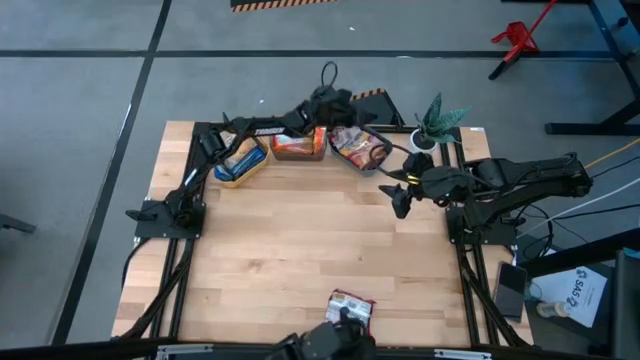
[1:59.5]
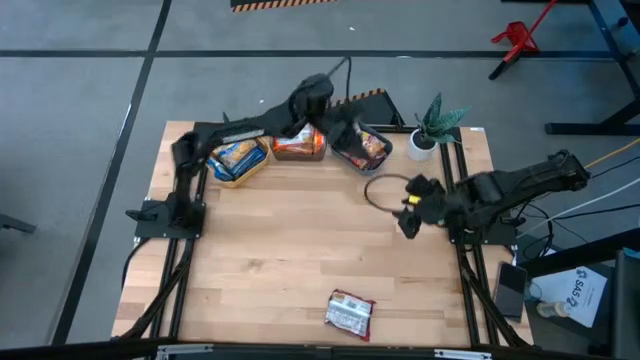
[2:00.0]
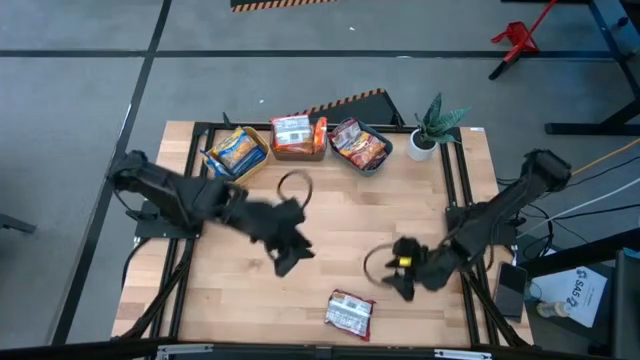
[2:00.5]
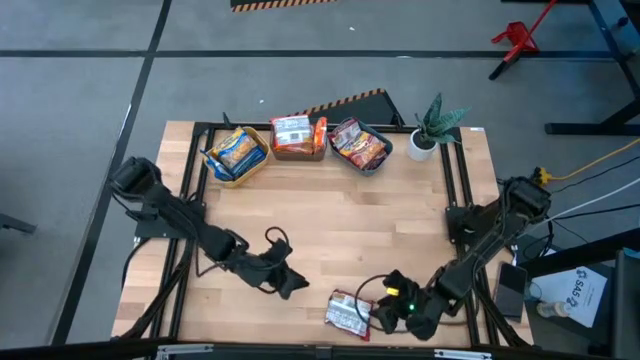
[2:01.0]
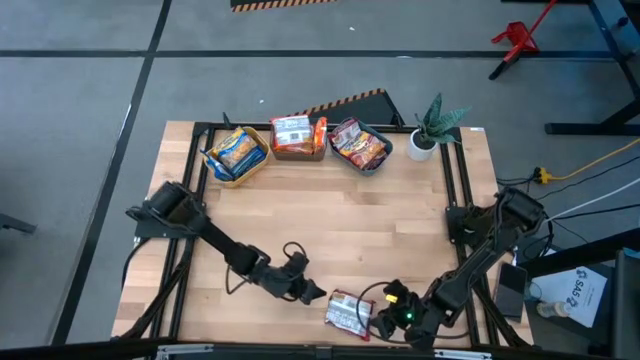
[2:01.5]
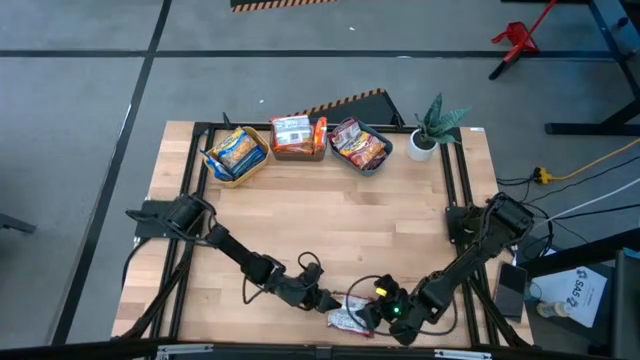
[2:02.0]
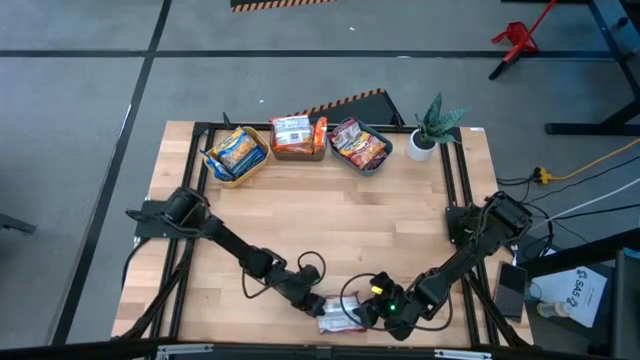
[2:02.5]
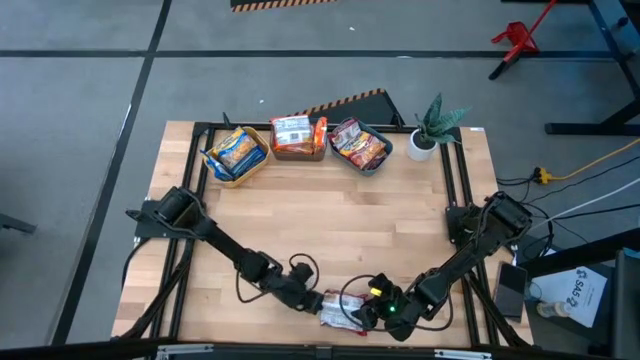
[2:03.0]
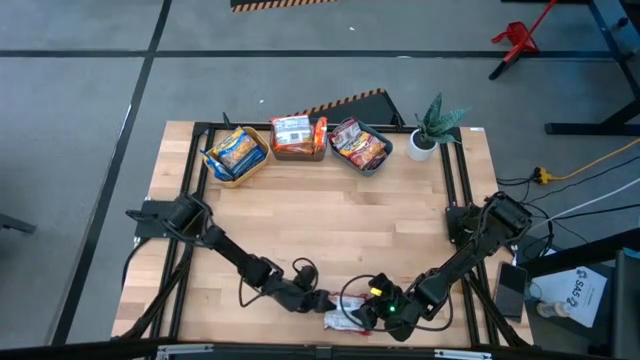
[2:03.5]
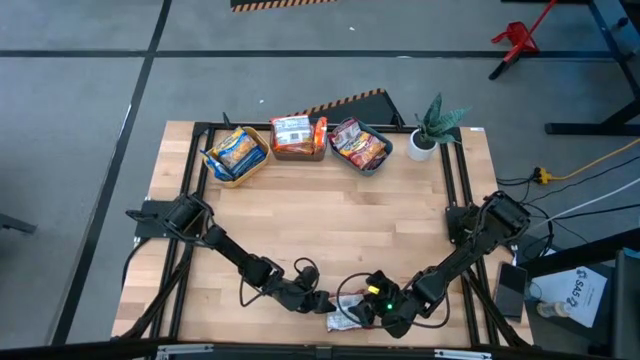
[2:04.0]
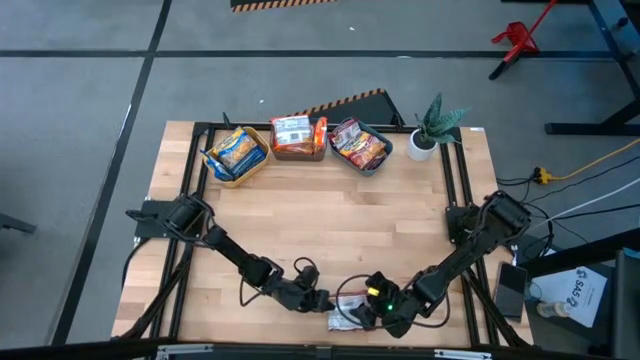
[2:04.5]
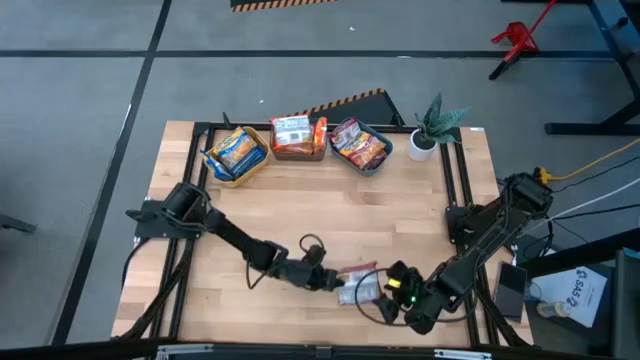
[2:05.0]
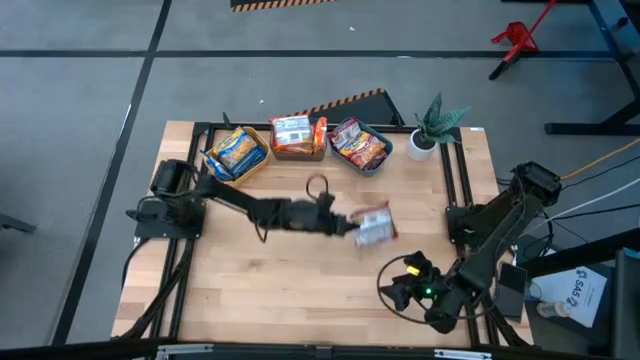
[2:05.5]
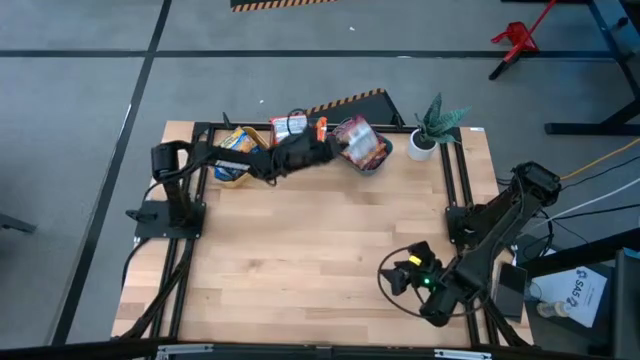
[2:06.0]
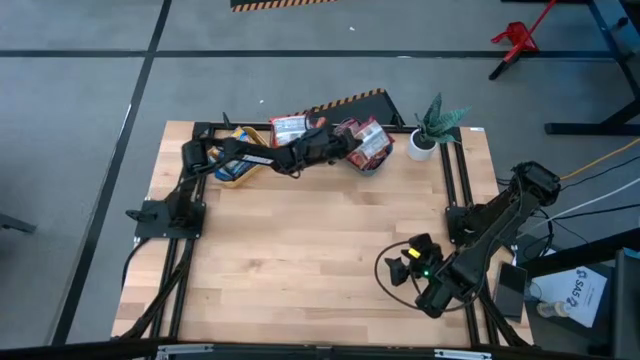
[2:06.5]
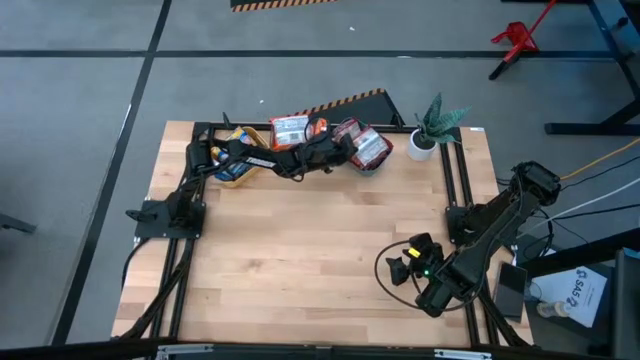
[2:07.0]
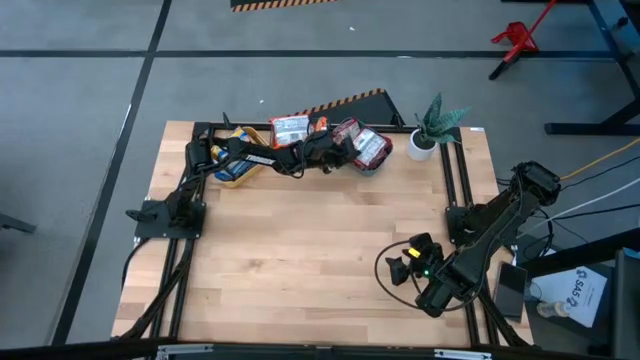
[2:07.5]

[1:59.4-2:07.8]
Task: Sort Maruchan noodles
Put the red noodle pack into the blue bin

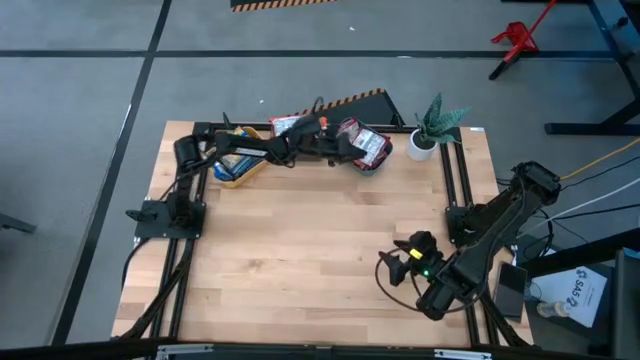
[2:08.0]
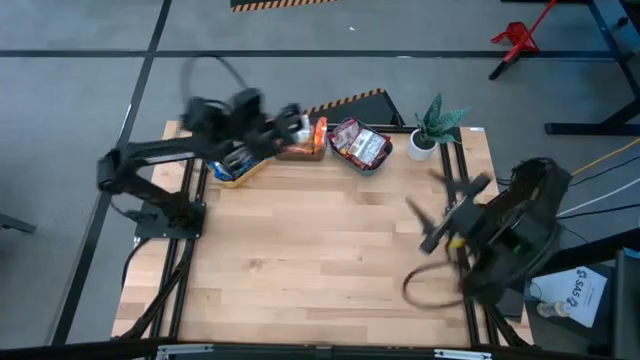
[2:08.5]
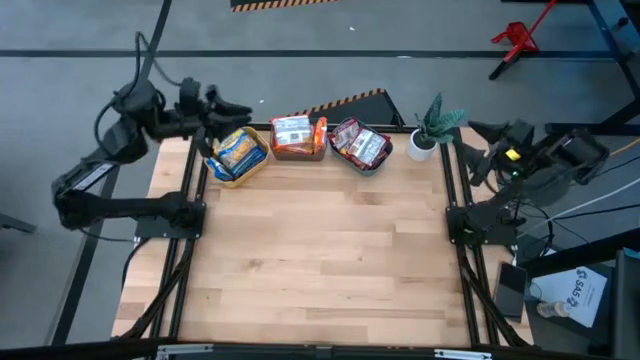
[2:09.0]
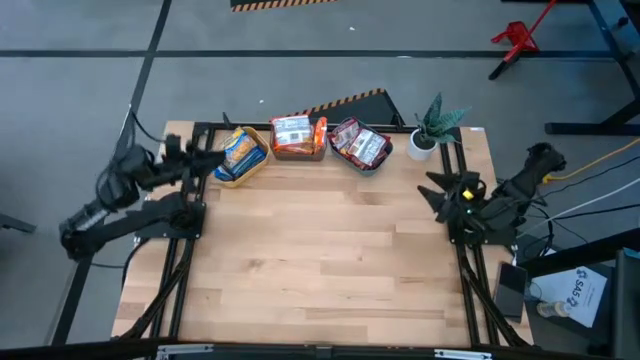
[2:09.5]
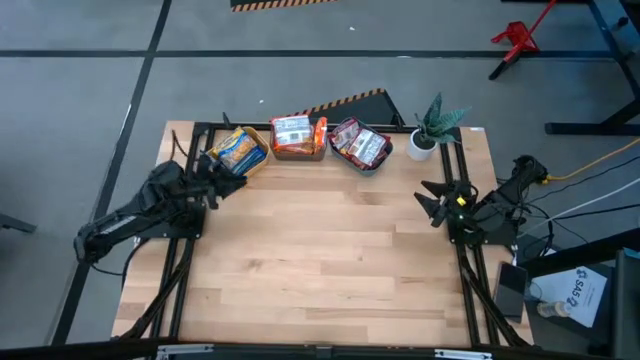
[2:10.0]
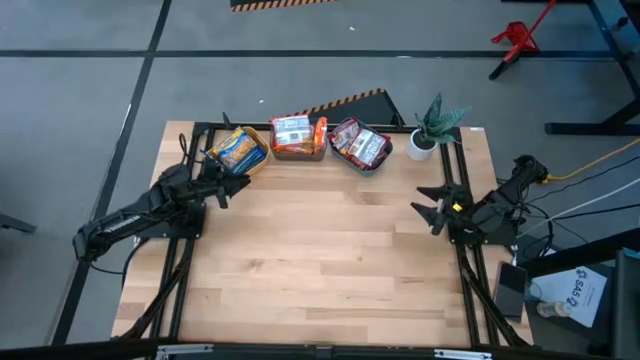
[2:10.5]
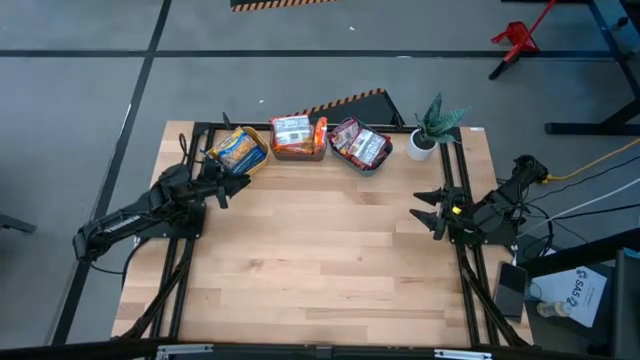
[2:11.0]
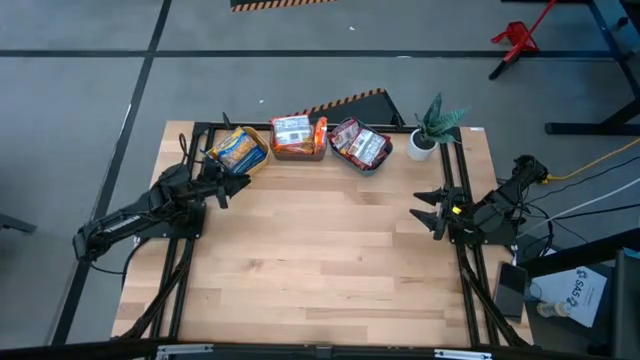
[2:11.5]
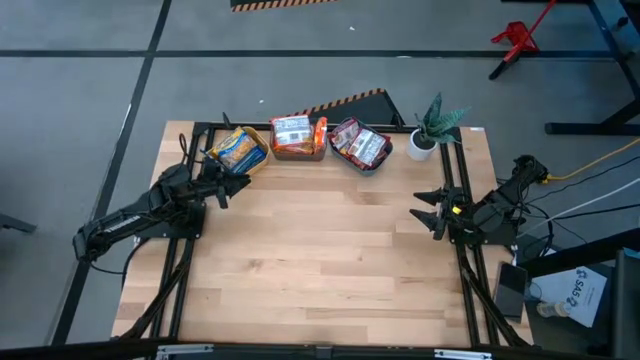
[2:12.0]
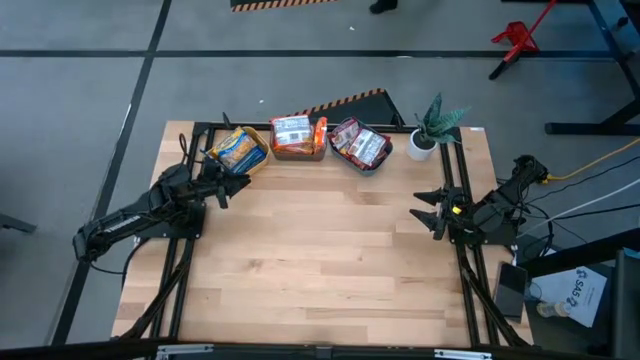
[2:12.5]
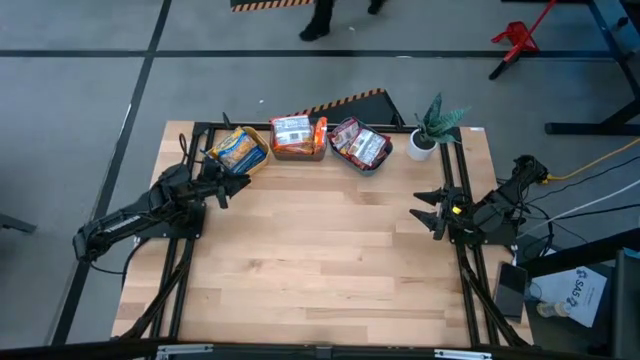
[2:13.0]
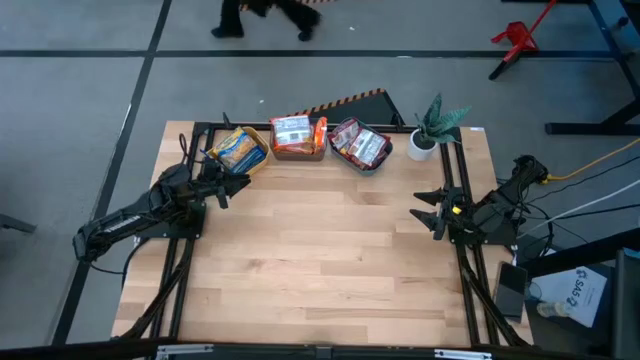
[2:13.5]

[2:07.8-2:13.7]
Return to Home Position

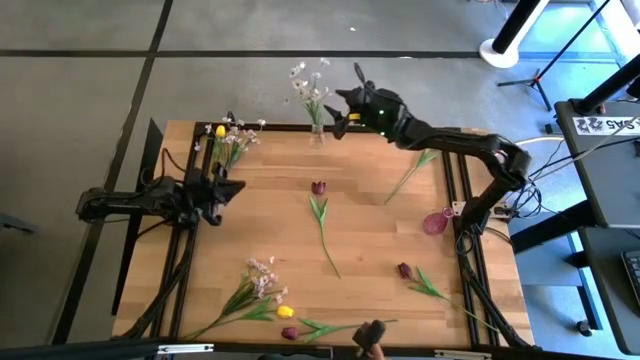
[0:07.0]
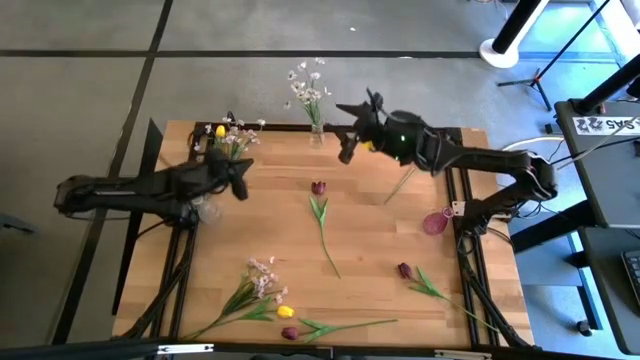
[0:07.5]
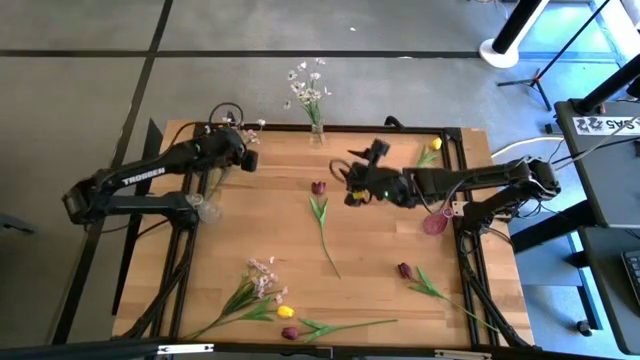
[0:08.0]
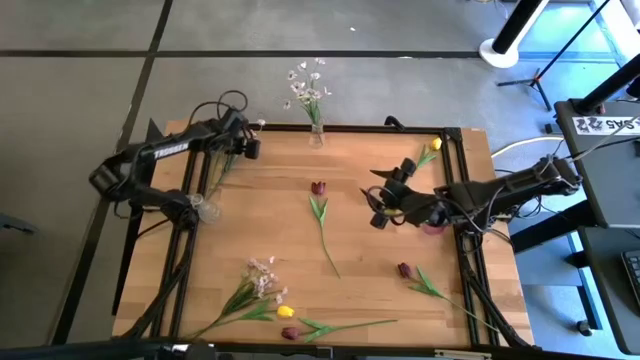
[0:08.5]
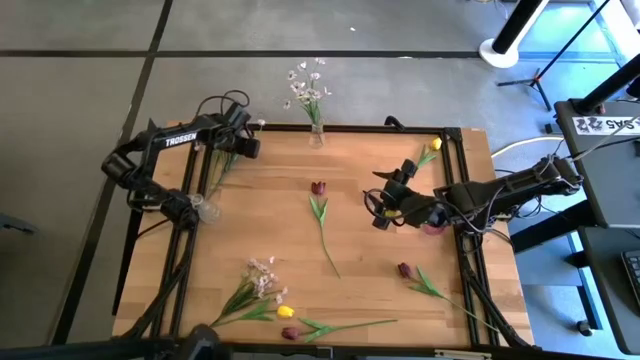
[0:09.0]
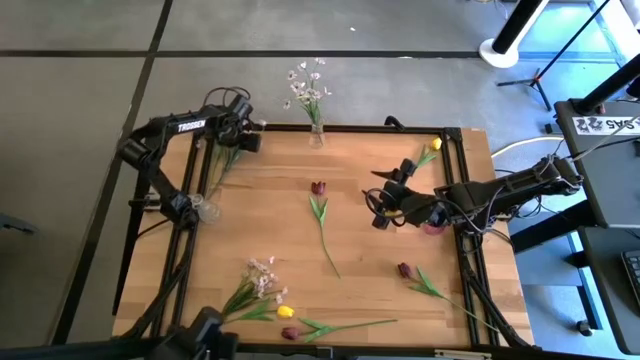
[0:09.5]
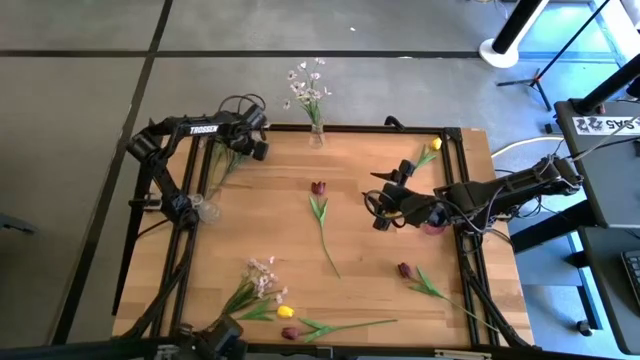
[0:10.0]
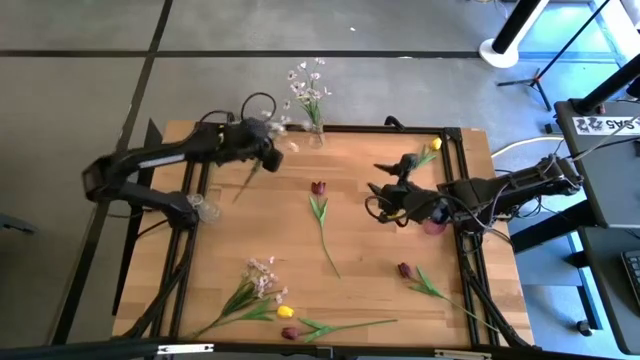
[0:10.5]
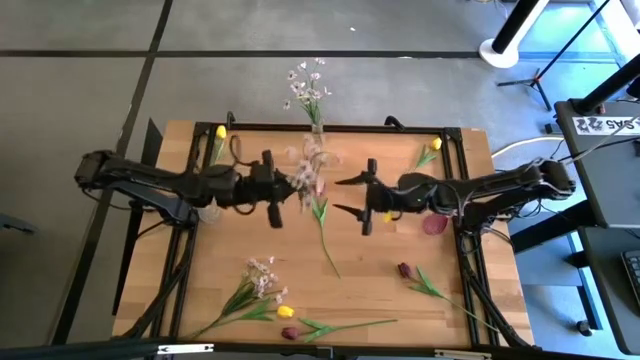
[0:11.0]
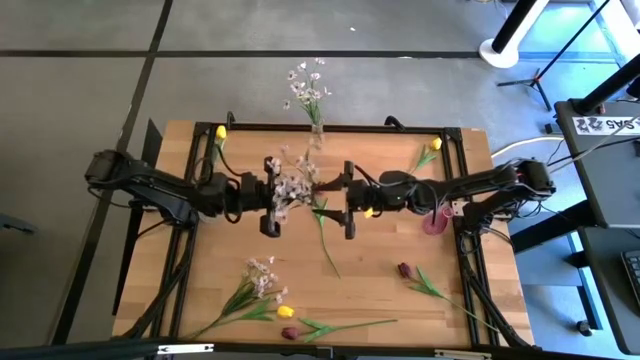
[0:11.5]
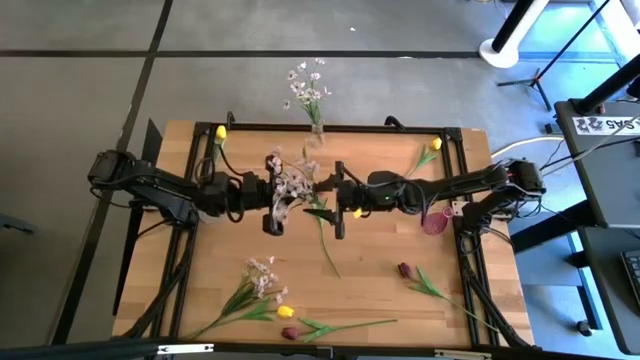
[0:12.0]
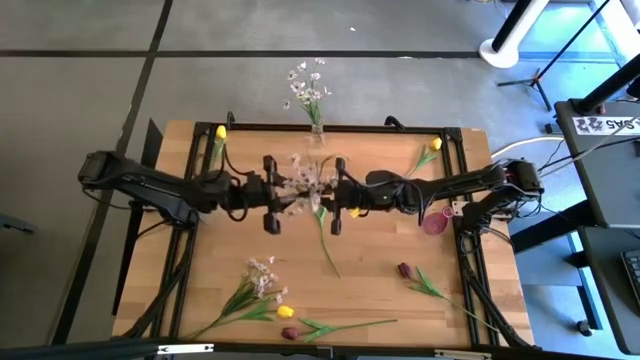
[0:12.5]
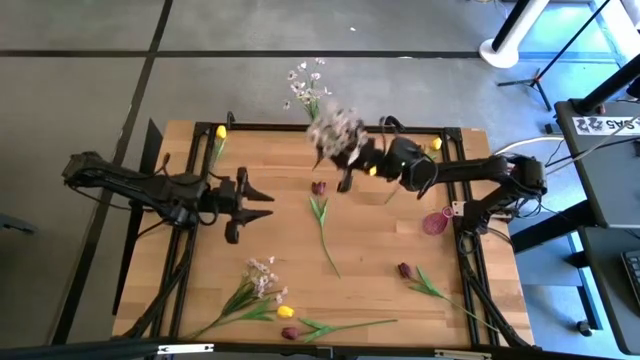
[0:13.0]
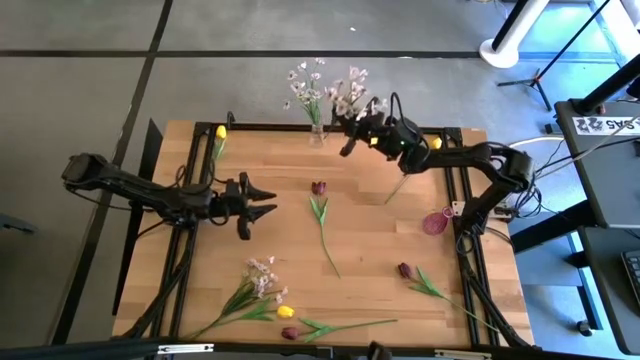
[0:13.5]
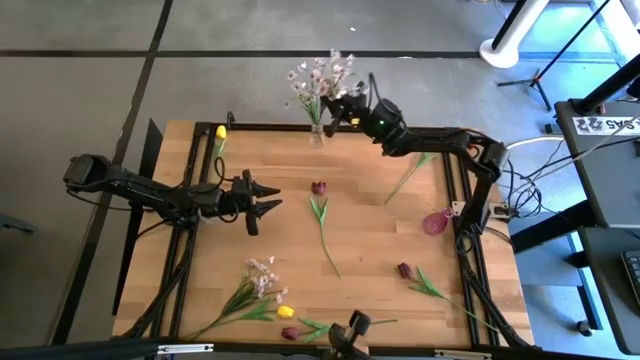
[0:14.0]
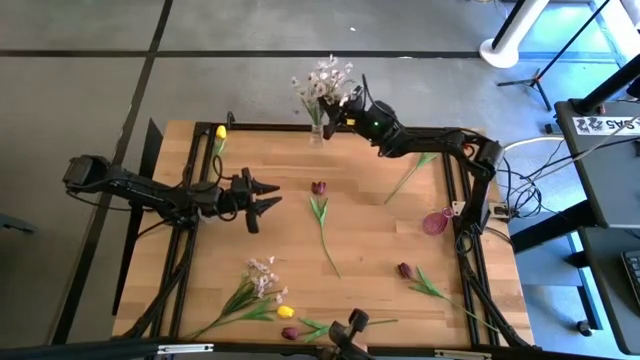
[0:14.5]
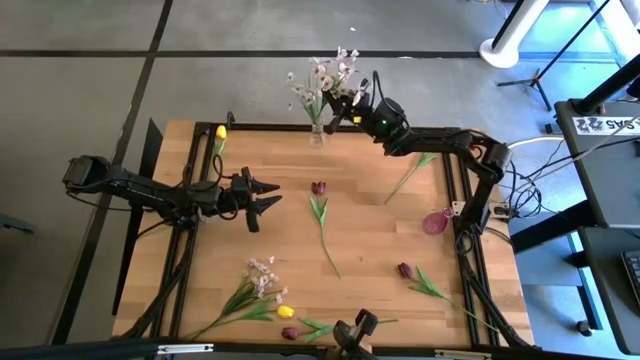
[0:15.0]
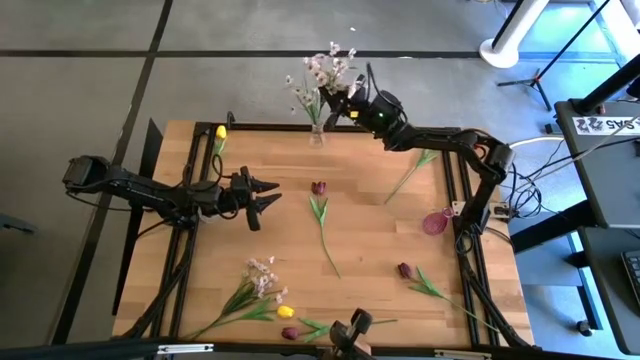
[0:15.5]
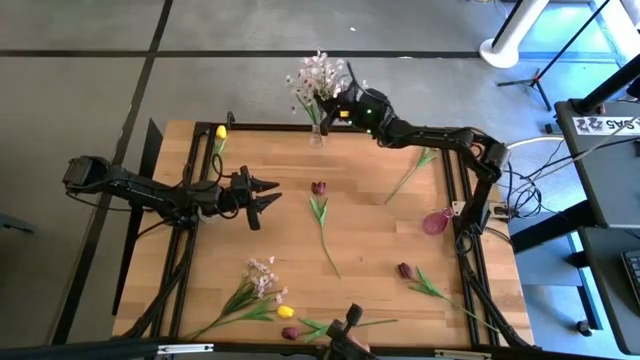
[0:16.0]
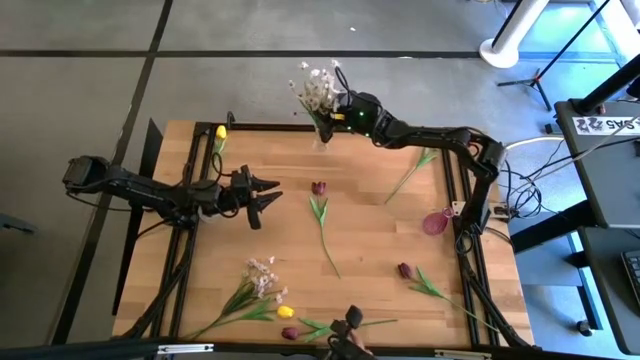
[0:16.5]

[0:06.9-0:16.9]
Task: Sort flowers into vase by color
Put the top white flower into the top transparent vase
